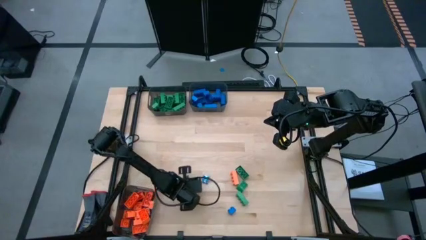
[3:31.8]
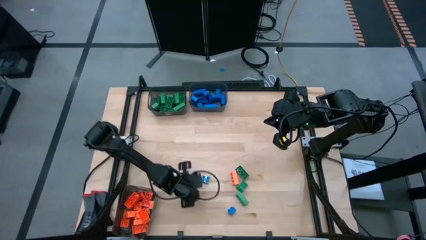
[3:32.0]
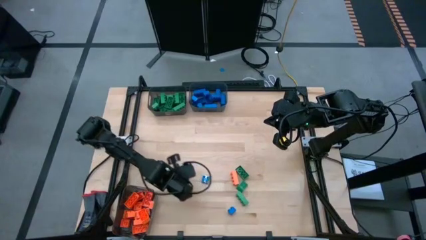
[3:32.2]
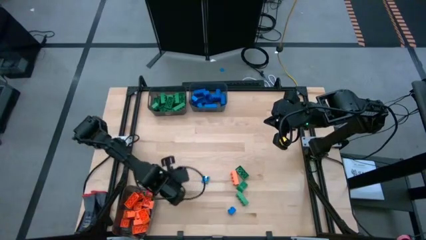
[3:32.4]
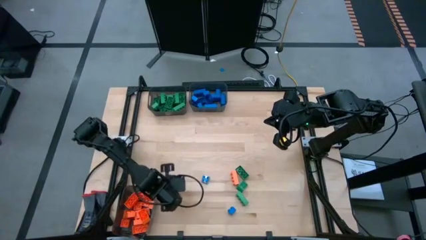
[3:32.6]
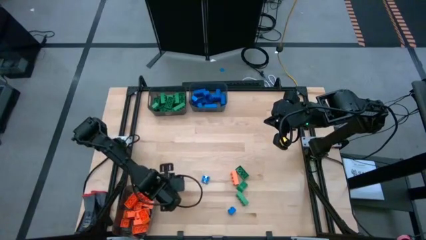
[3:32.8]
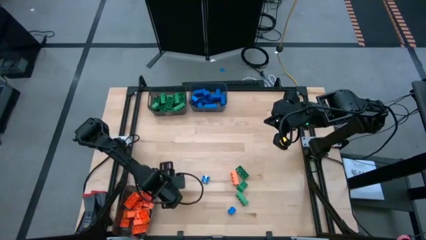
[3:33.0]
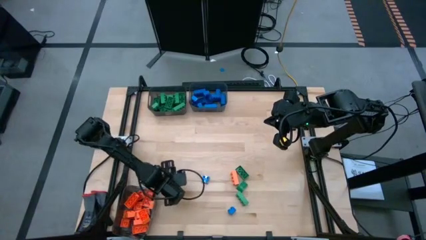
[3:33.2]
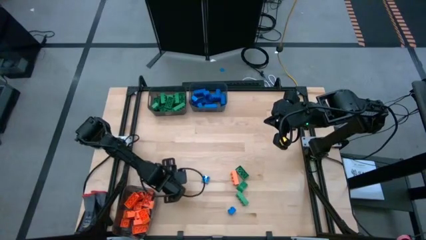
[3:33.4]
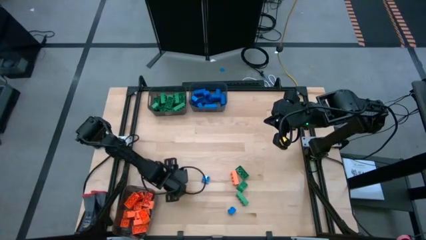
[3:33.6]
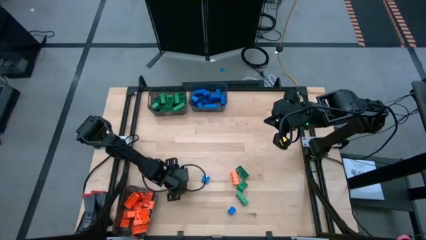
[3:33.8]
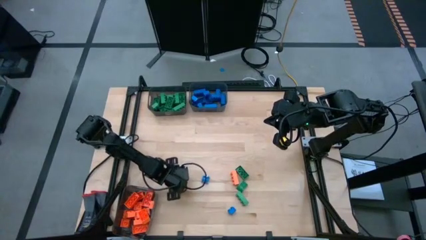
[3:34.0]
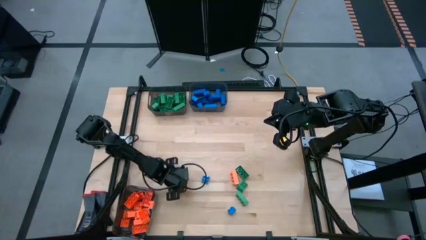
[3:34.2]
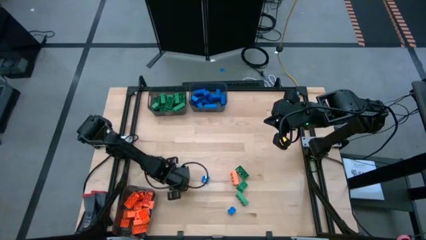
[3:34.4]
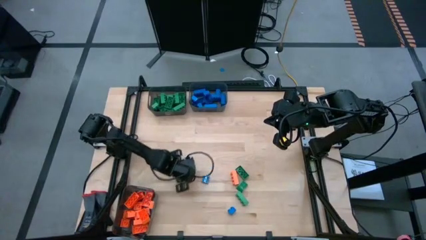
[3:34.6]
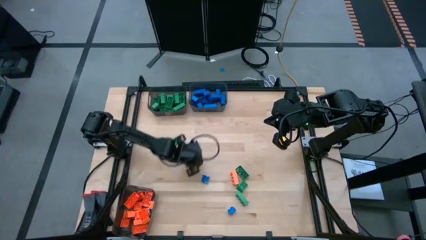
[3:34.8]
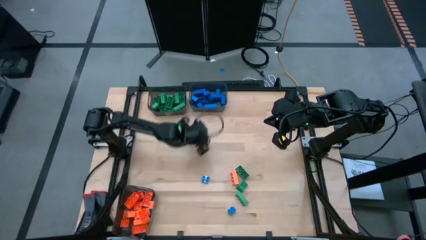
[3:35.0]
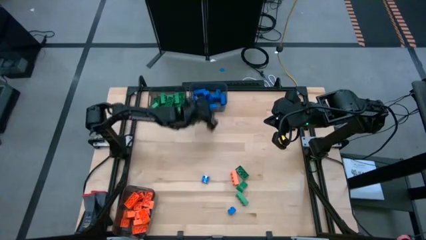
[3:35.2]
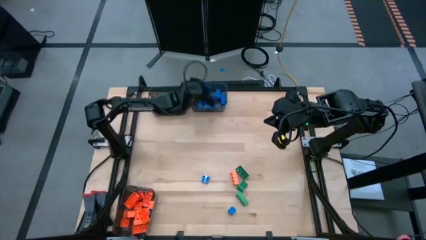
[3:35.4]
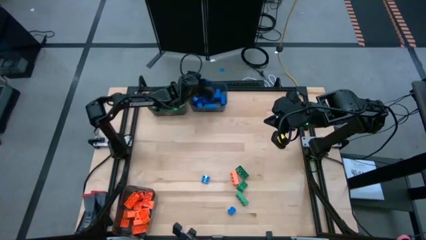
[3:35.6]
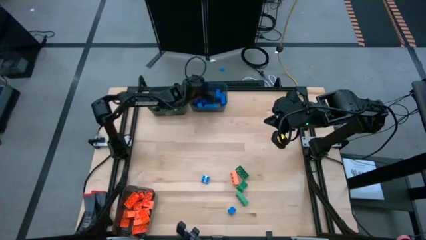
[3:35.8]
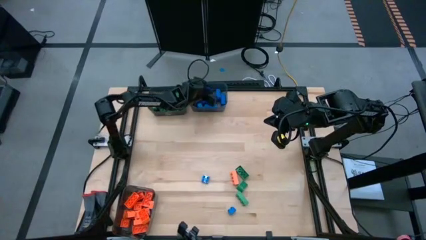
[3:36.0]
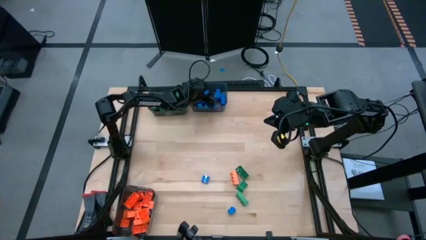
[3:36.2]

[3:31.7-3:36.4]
Task: Sort blocks
Put the blue gamepiece into the top right black bin

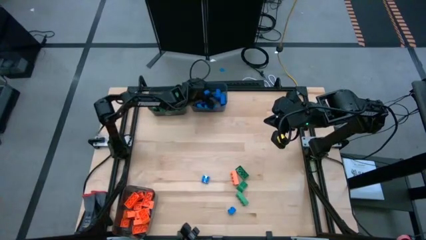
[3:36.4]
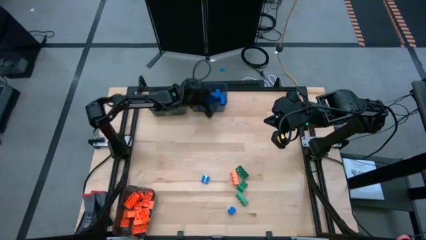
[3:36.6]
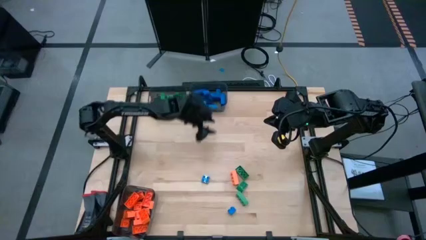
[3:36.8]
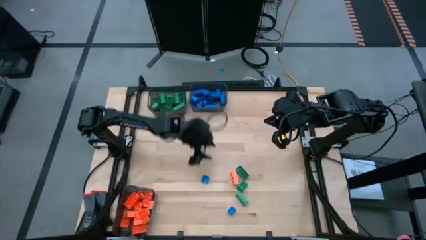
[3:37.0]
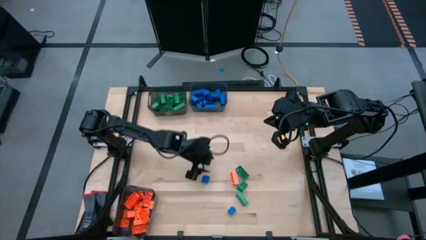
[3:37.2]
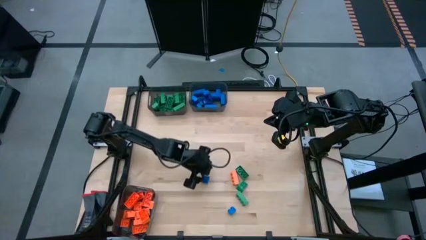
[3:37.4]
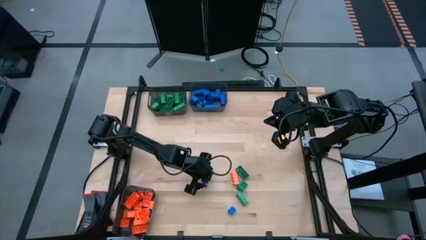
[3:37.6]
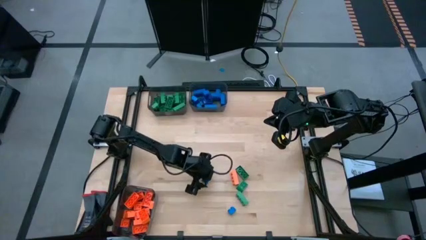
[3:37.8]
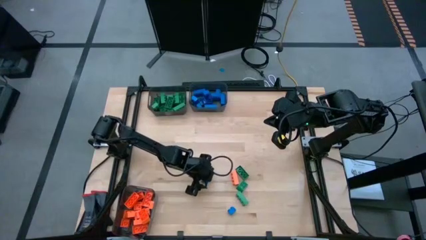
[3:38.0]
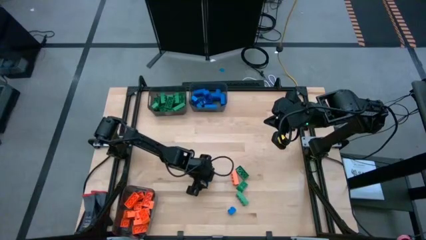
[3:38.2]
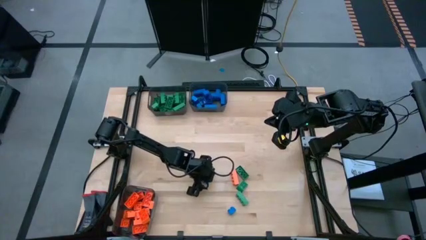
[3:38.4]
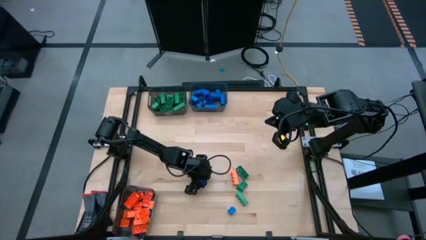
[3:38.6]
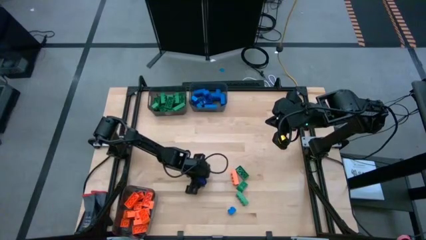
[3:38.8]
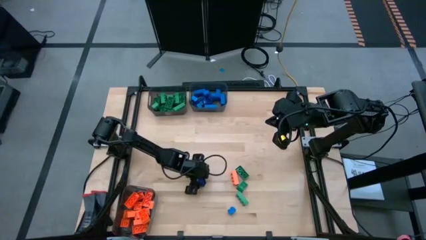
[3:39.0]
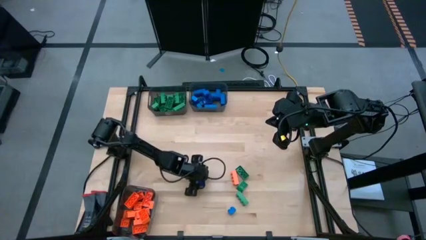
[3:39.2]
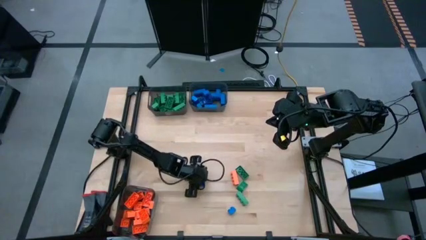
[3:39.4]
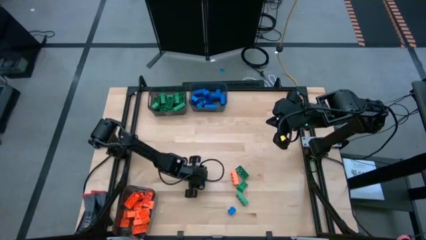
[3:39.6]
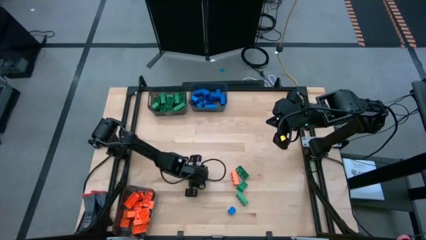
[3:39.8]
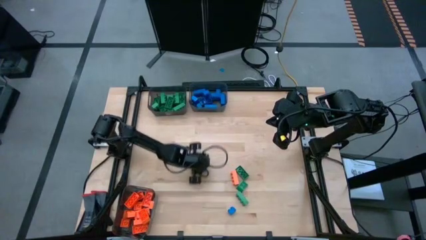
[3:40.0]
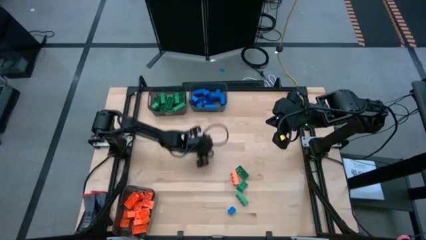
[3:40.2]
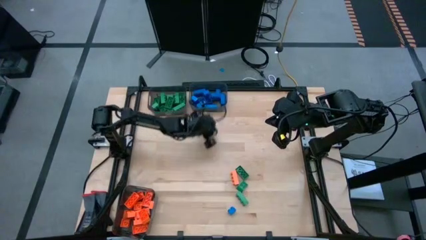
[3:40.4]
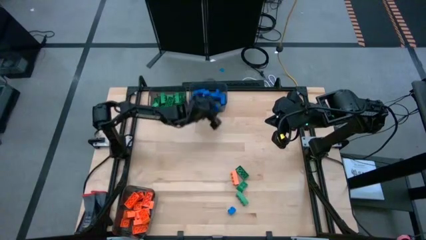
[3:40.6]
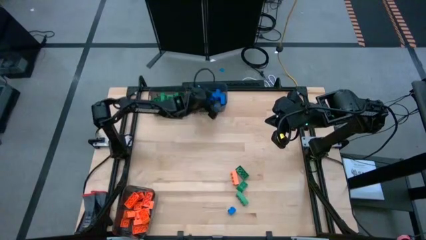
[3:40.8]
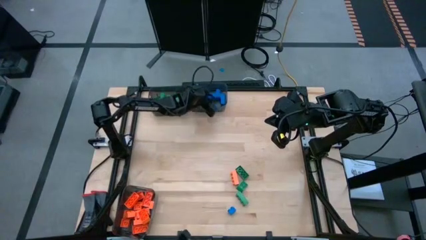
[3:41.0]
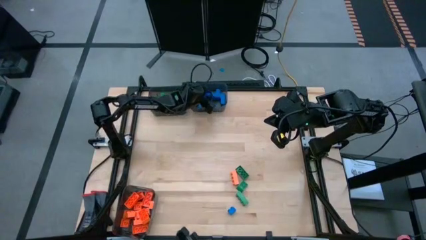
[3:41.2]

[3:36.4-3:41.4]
Put the blue gamepiece into the top right black bin

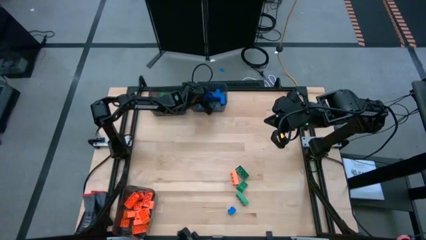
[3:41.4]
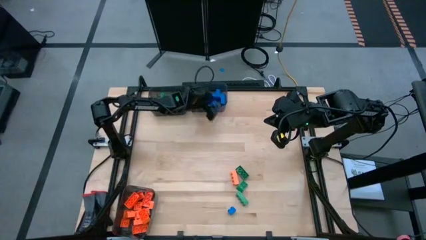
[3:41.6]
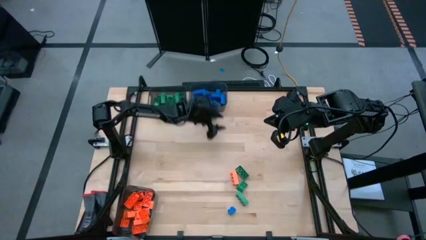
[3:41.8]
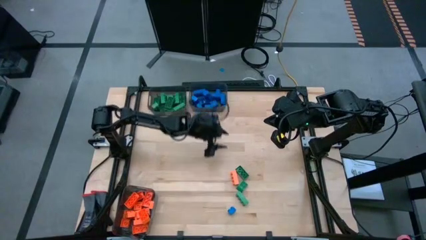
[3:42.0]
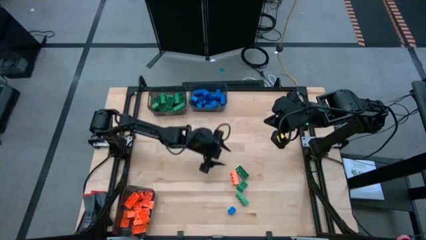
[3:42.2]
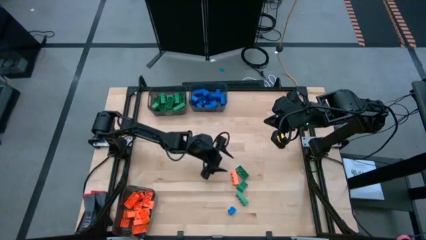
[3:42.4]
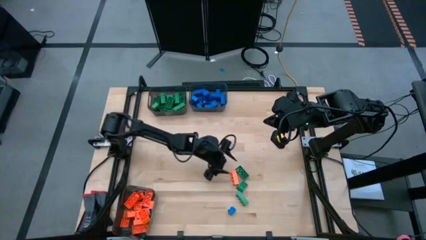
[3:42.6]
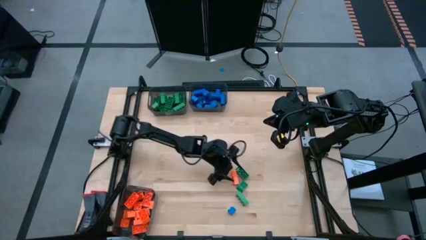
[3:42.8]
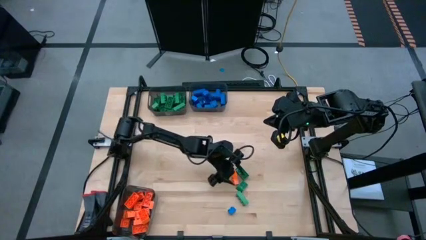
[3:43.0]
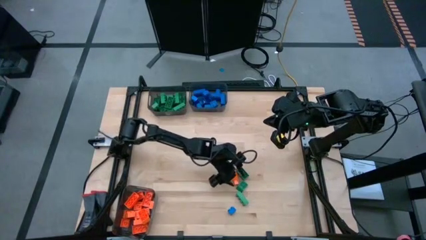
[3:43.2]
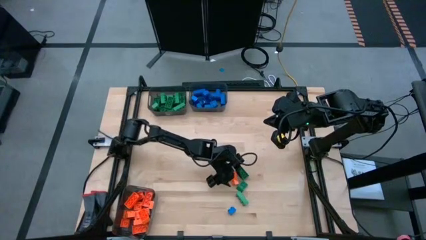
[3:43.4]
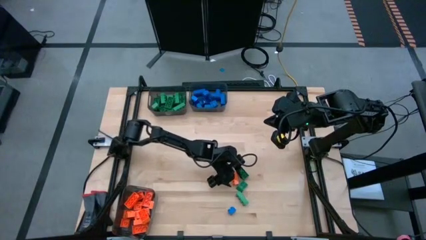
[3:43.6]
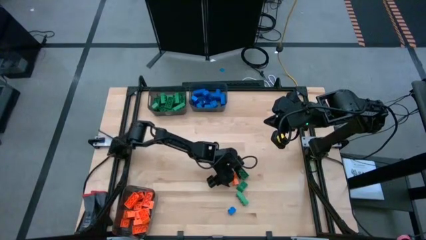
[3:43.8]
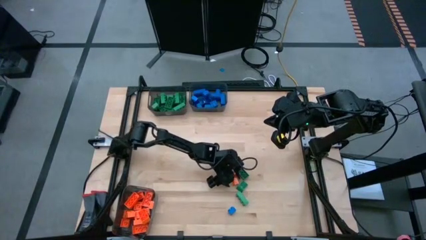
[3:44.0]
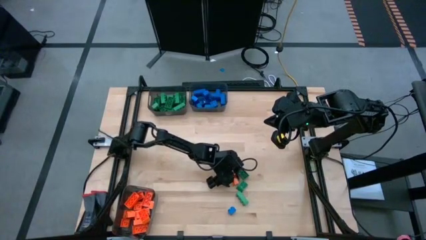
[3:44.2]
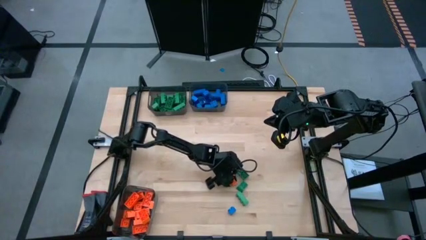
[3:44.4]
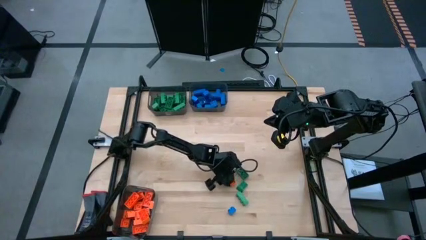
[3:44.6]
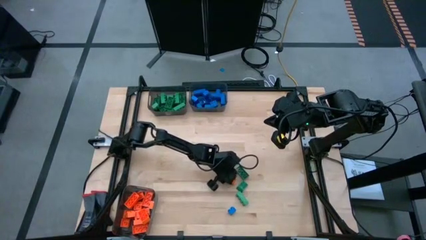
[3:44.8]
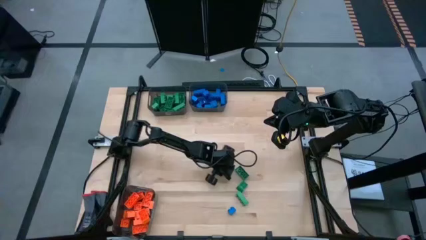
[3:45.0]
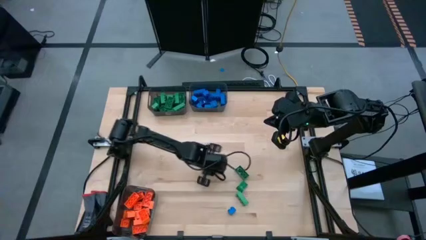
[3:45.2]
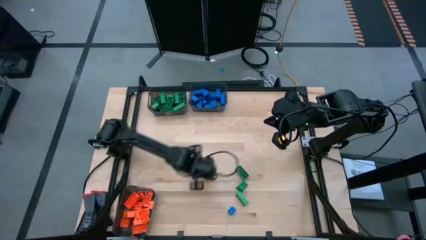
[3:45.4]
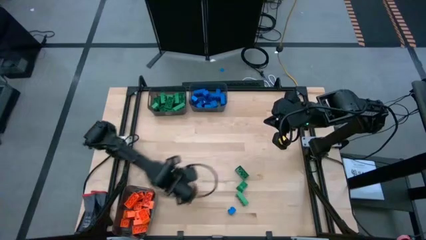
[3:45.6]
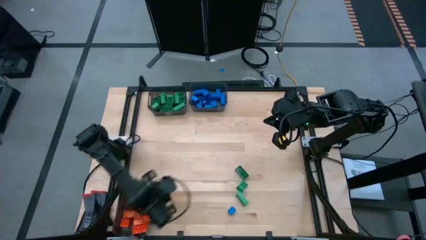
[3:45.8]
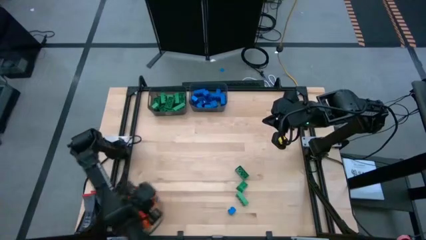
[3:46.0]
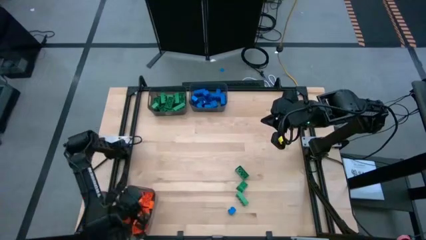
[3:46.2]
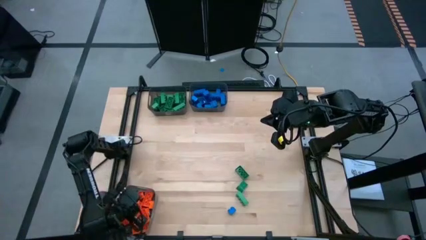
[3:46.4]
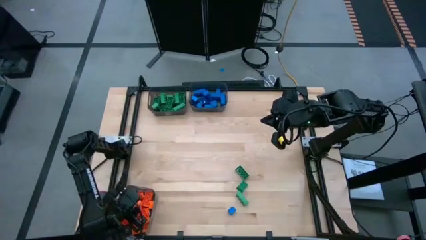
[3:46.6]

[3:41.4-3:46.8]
Put the orange gamepiece into the bottom black bin

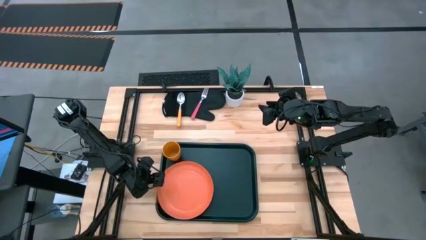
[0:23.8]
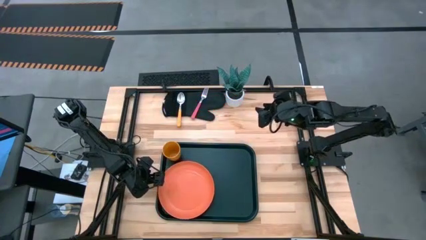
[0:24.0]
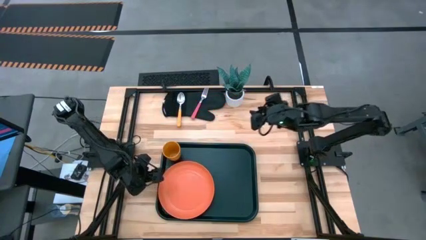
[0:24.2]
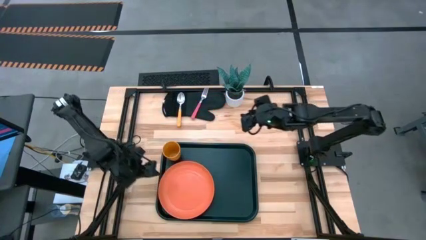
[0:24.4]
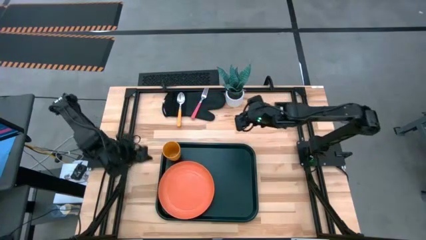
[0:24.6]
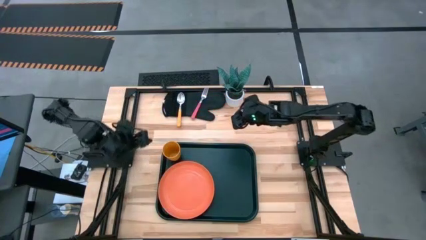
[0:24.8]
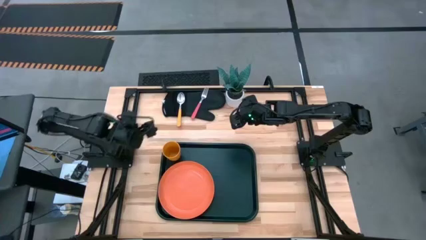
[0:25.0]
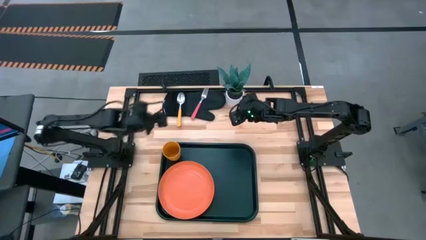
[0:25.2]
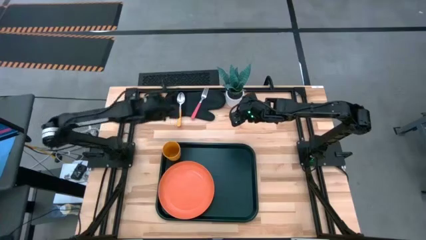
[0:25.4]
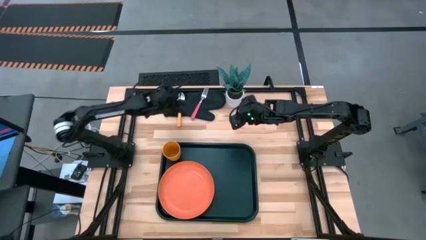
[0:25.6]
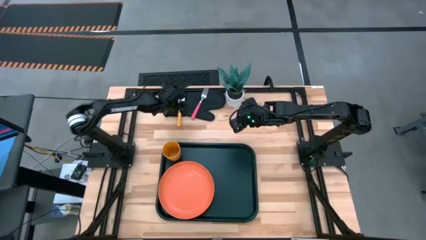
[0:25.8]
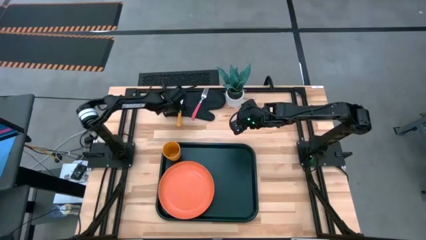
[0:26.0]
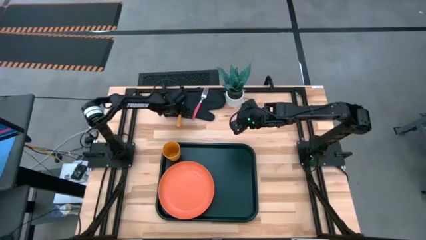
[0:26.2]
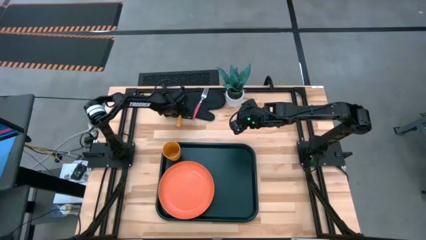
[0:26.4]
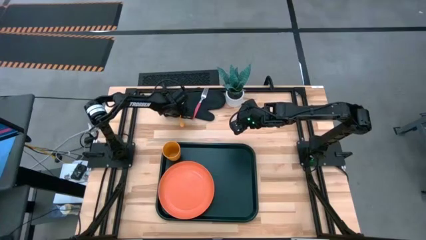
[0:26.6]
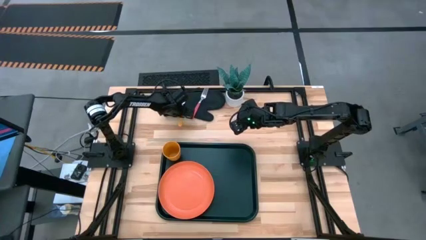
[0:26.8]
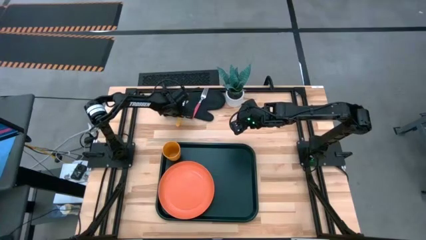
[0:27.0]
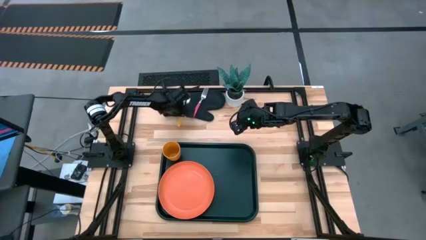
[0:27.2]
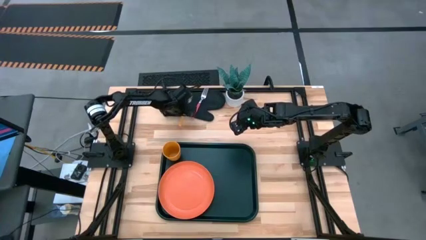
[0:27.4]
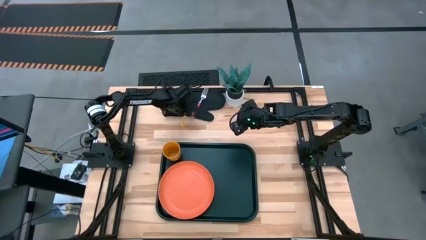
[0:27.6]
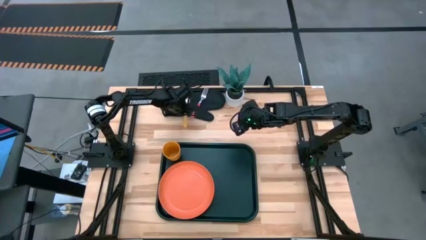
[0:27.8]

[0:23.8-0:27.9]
Task: Pick and place plate/cup/fork/spoon on tray
Put the yellow spoon to the right of the orange plate on the black serving tray
